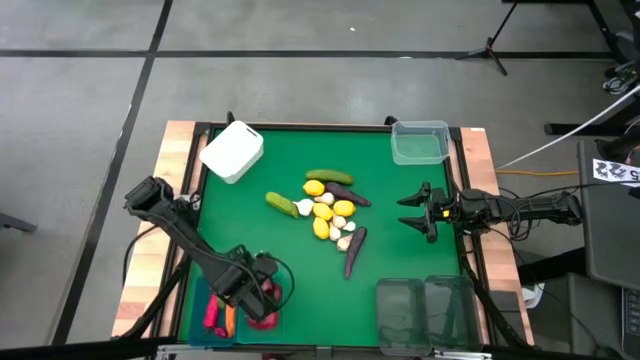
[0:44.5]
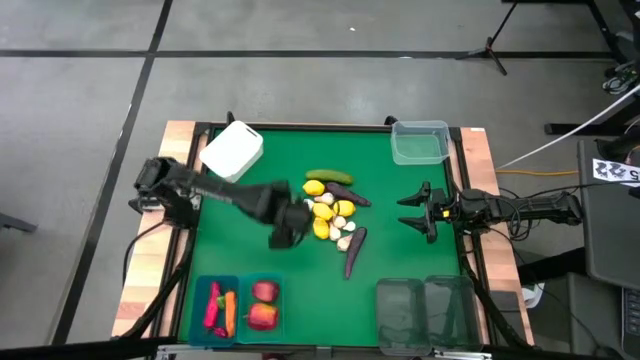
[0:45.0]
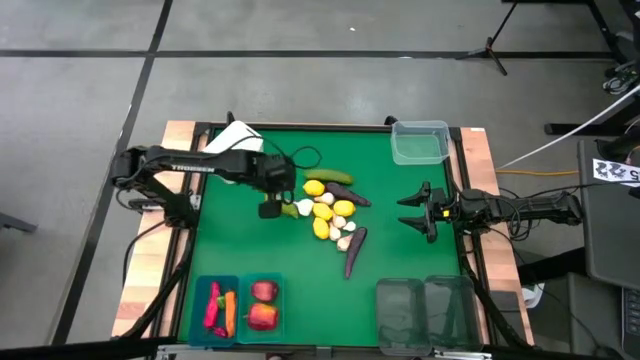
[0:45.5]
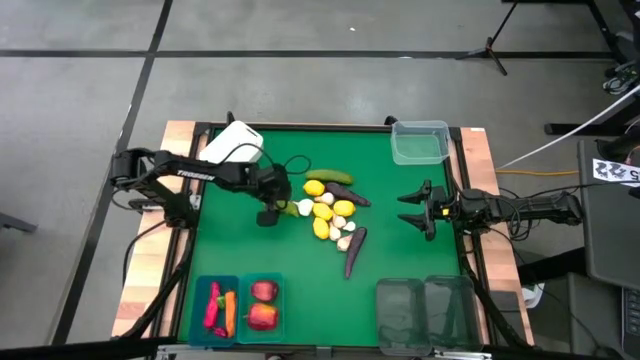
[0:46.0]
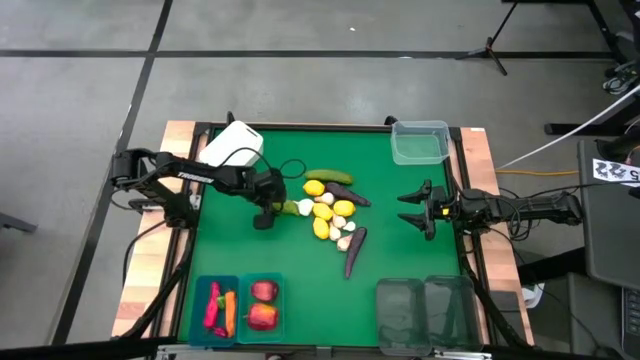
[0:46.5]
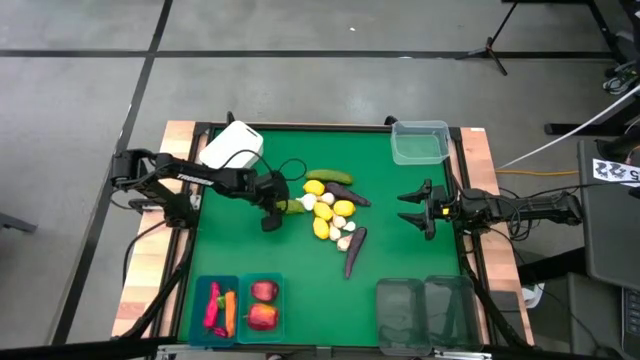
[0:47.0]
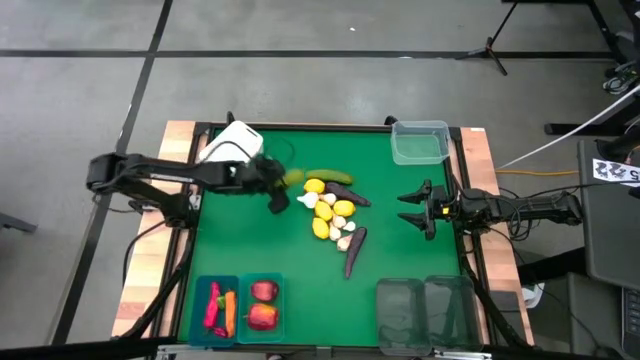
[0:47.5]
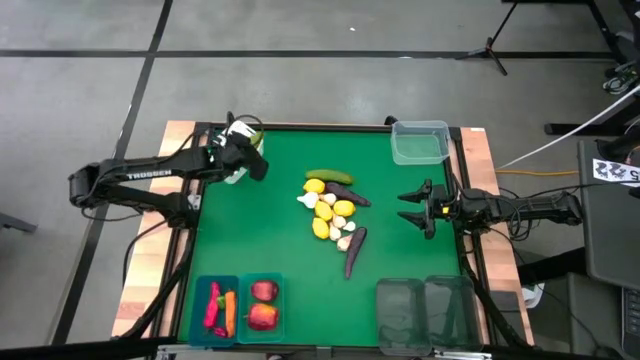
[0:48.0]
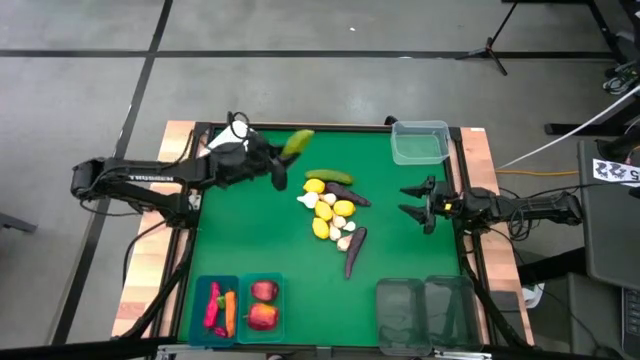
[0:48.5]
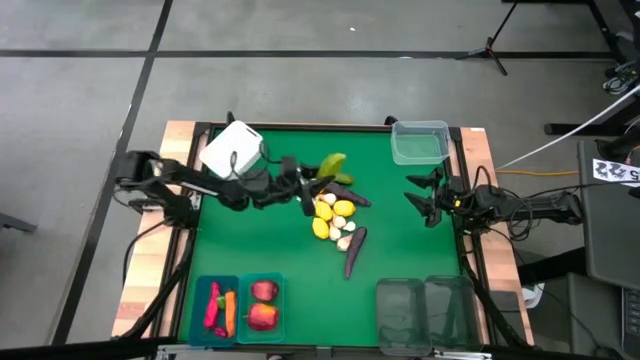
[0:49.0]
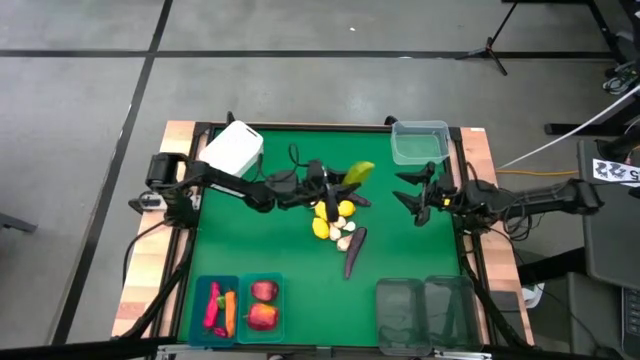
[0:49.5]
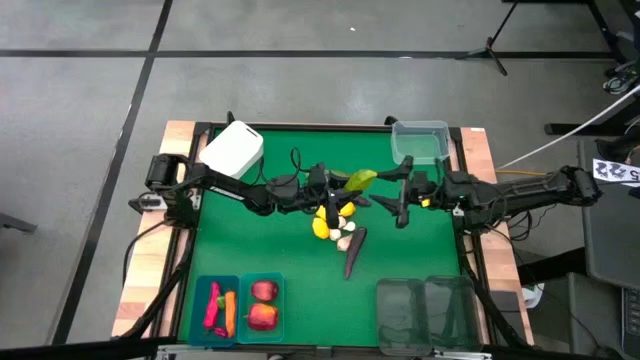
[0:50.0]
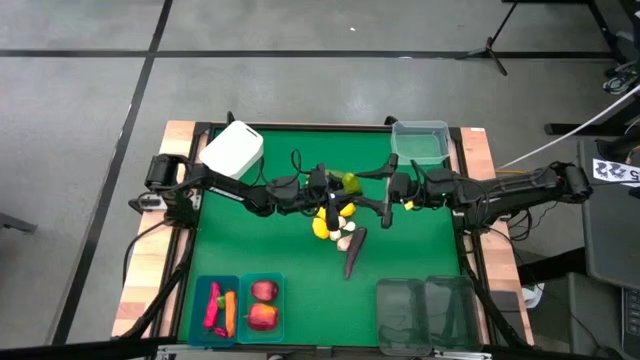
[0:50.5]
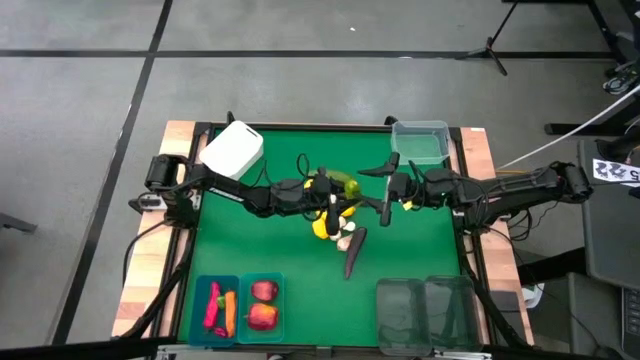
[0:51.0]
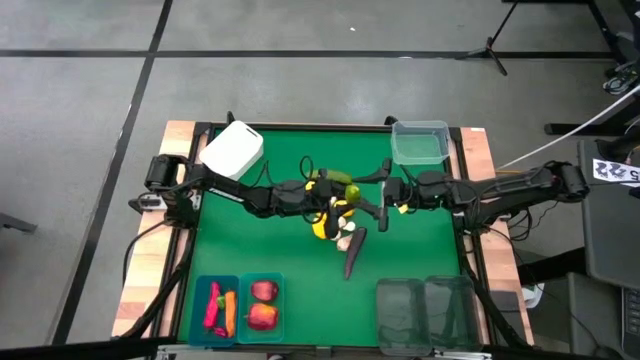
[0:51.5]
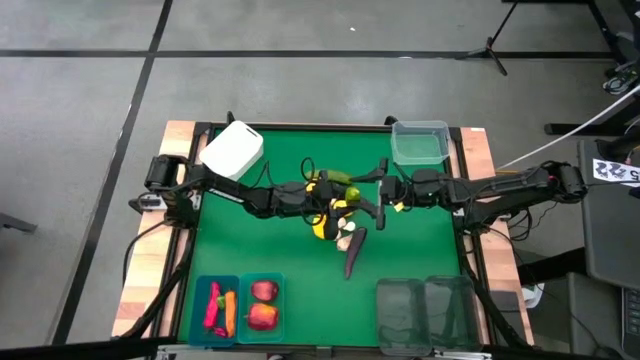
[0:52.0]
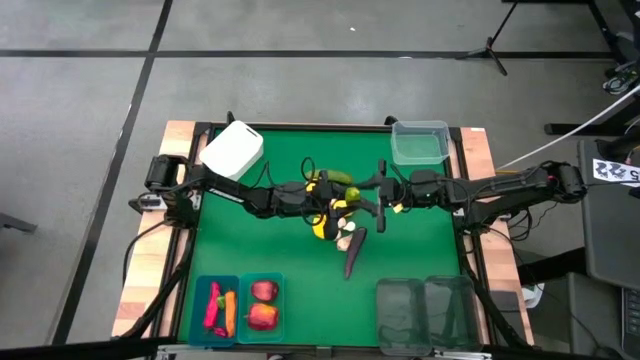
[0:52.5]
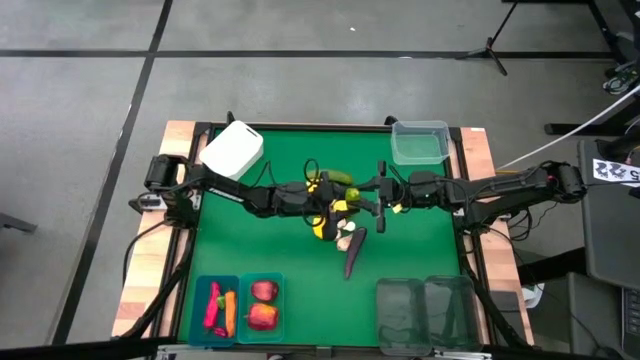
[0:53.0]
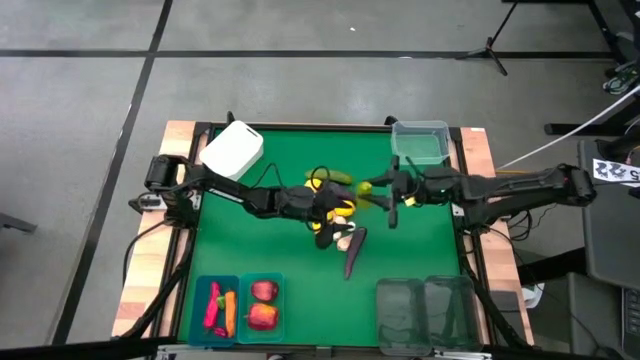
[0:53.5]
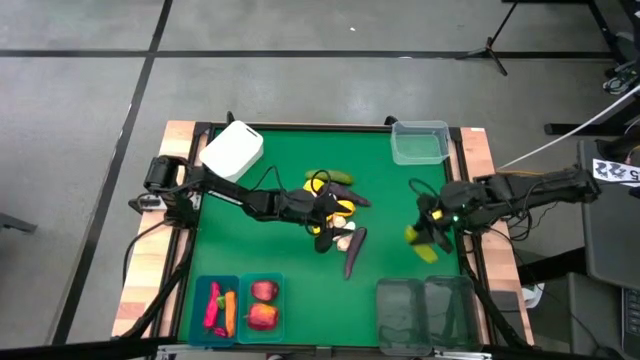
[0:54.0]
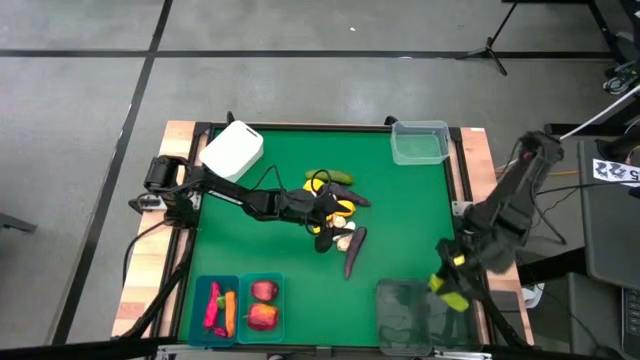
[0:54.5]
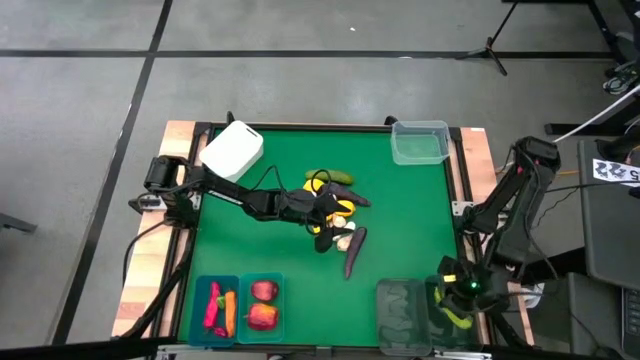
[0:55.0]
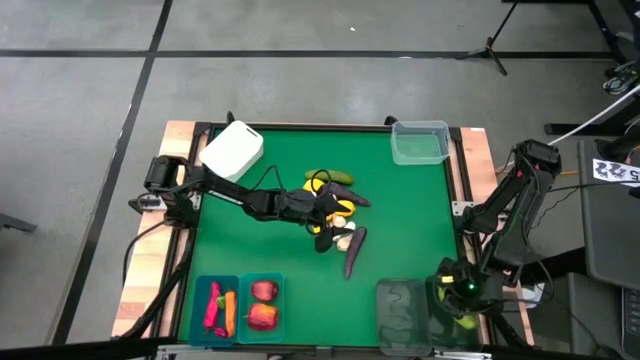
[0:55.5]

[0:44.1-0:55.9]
Task: Sort produce into baskets
Put the cucumber into the right black bin

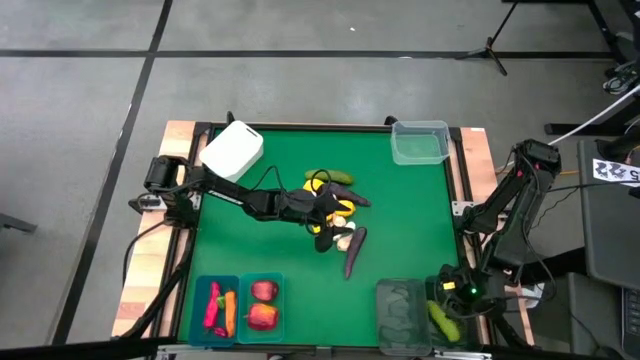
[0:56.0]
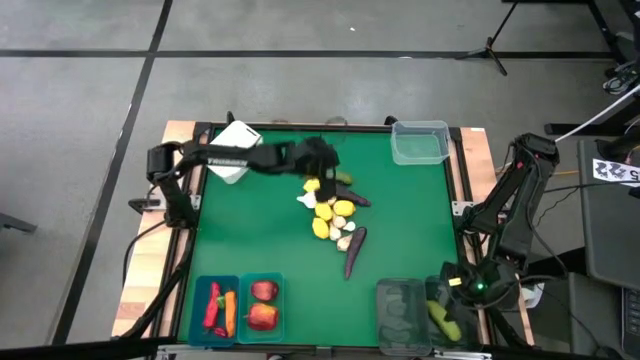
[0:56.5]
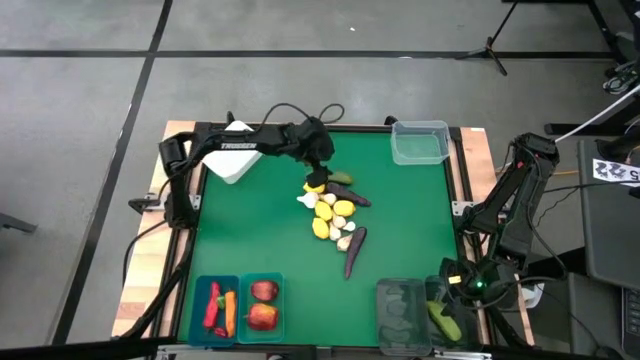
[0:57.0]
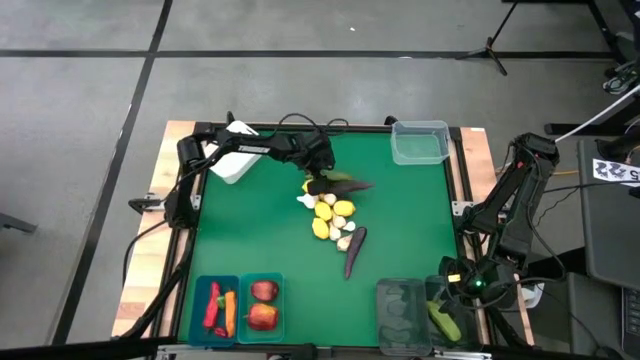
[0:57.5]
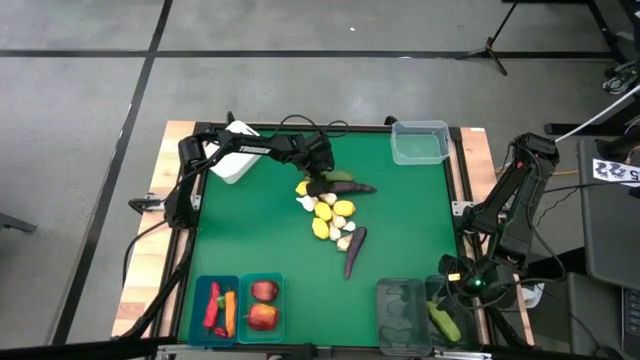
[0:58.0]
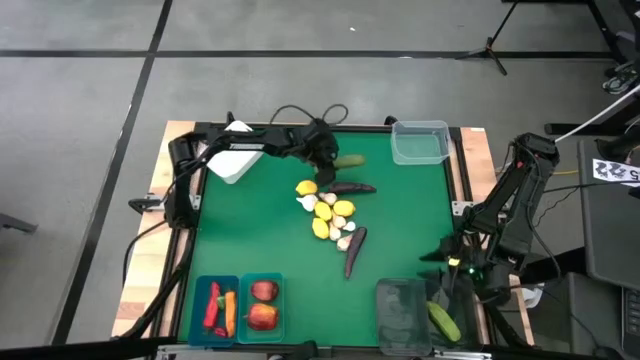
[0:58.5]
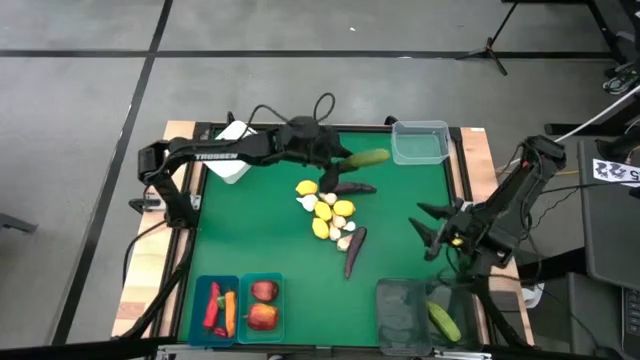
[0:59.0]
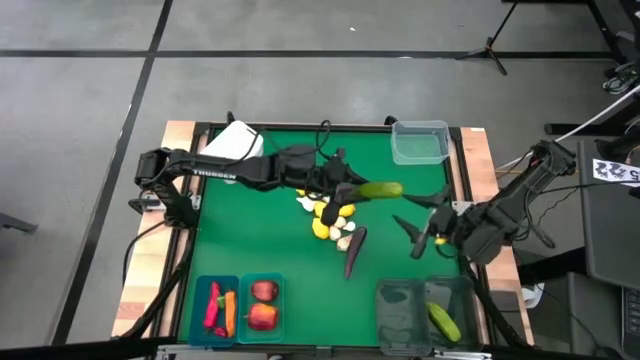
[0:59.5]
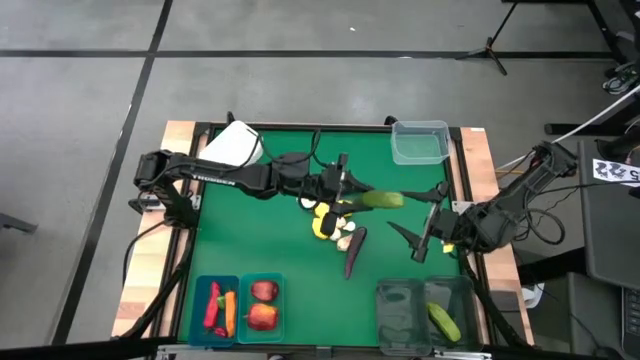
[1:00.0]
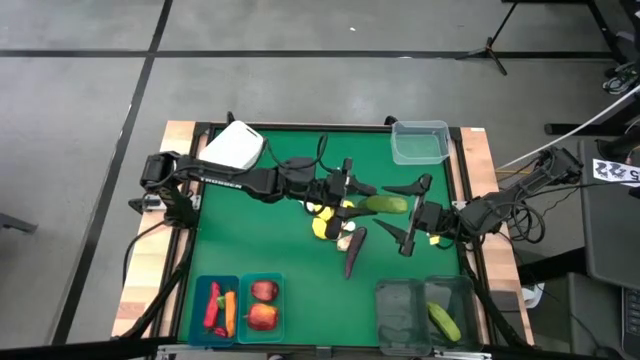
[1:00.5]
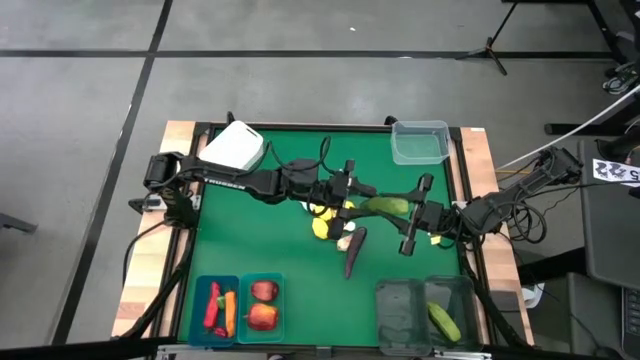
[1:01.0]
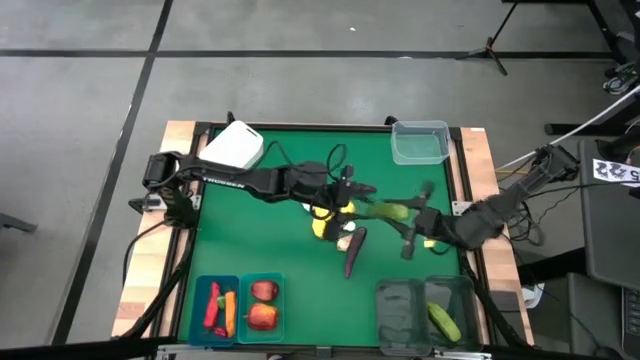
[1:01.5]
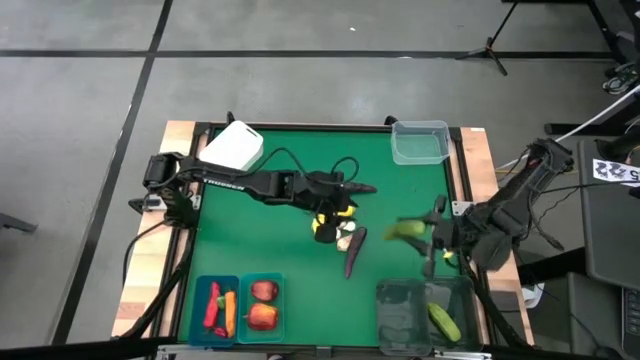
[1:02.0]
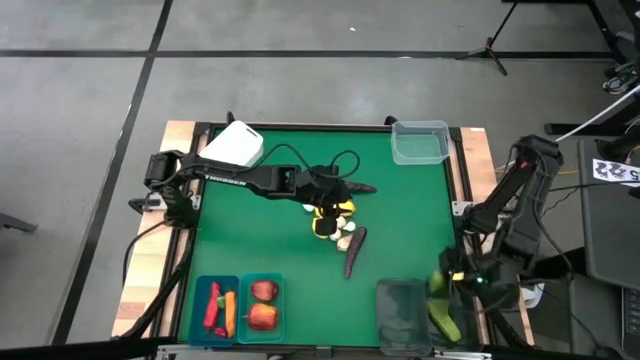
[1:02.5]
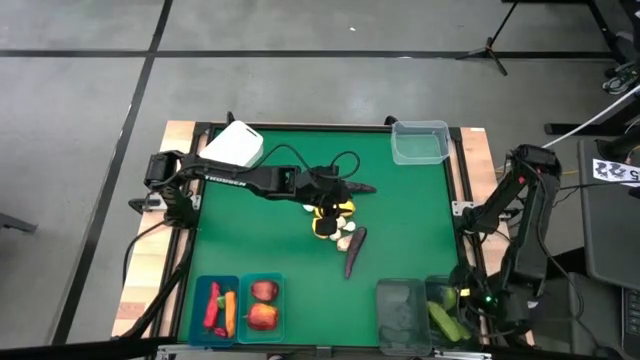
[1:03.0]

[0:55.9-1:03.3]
Put the cucumber into the right black bin

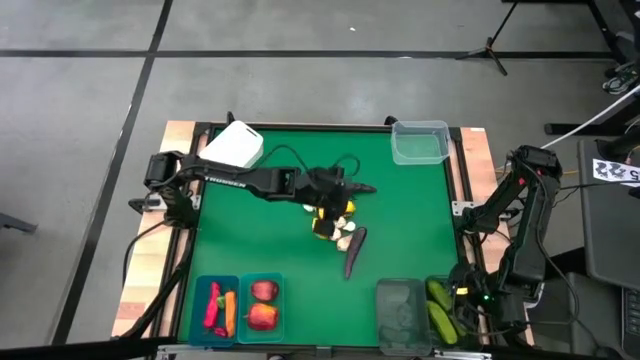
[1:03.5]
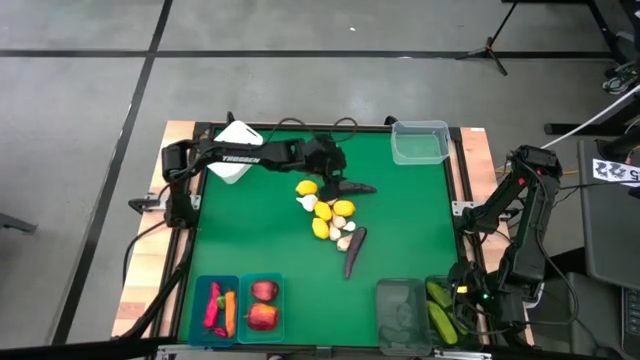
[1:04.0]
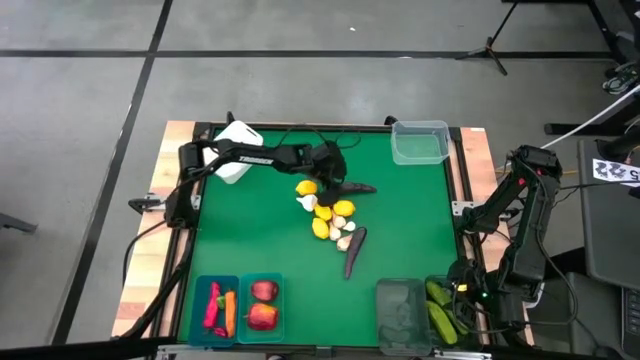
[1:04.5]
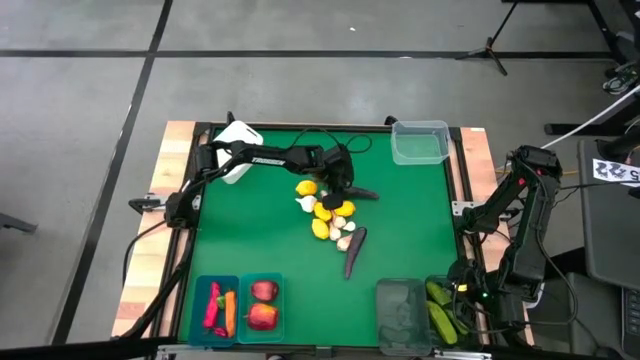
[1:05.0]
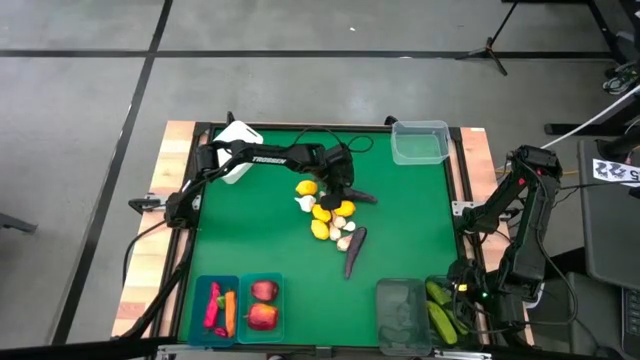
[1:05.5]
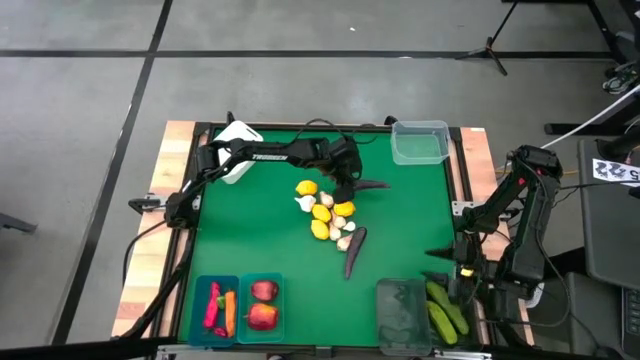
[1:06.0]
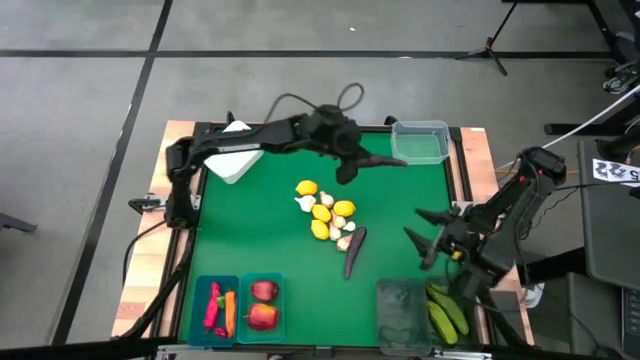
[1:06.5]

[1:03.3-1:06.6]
Put the eggplant into the transparent bin
